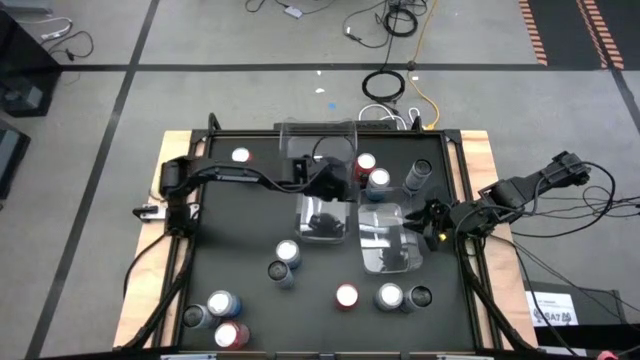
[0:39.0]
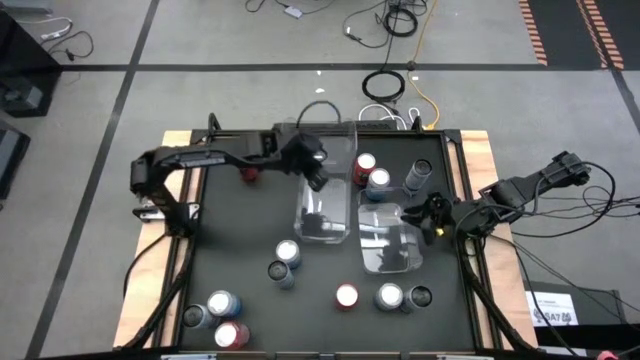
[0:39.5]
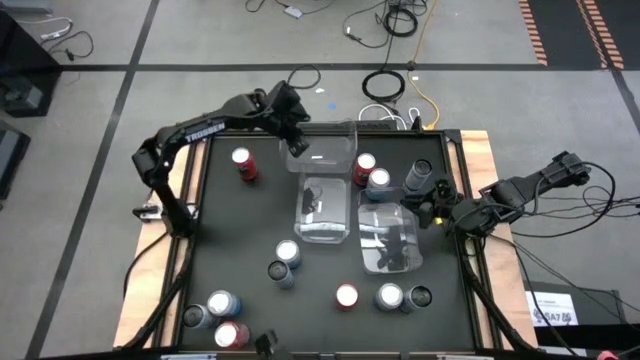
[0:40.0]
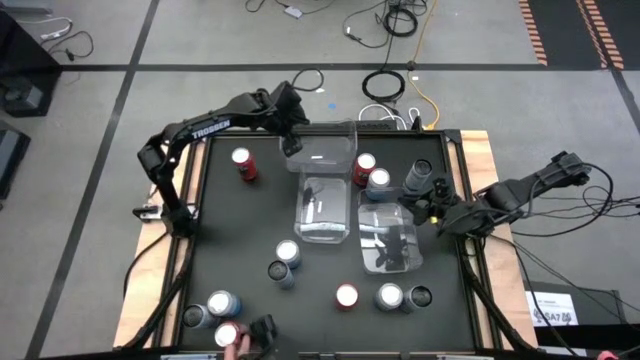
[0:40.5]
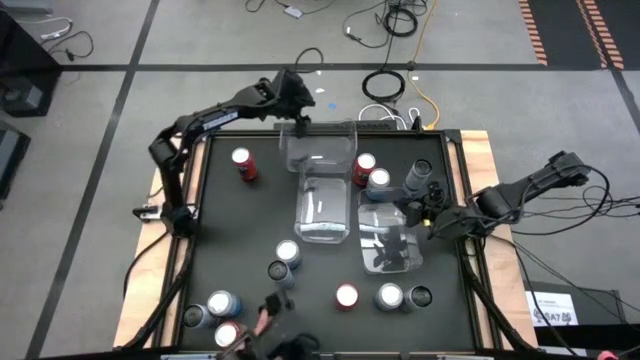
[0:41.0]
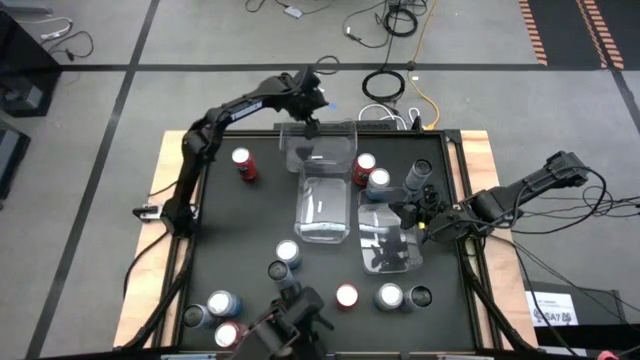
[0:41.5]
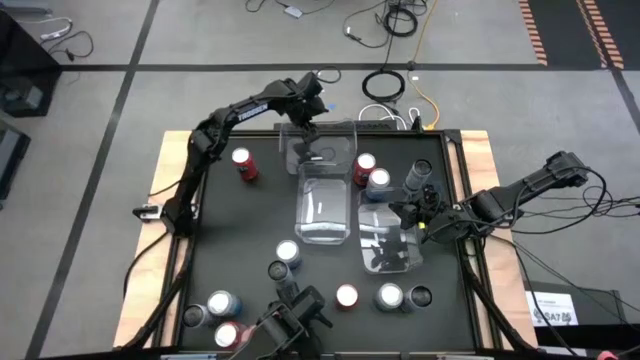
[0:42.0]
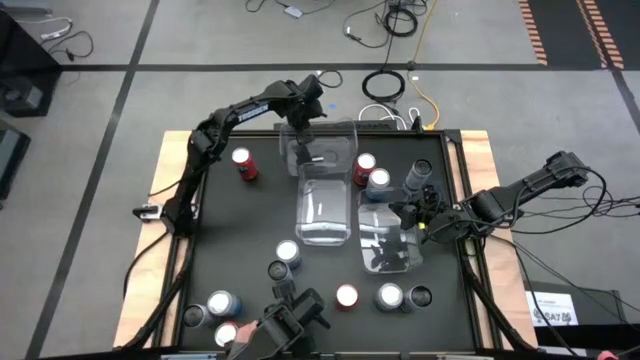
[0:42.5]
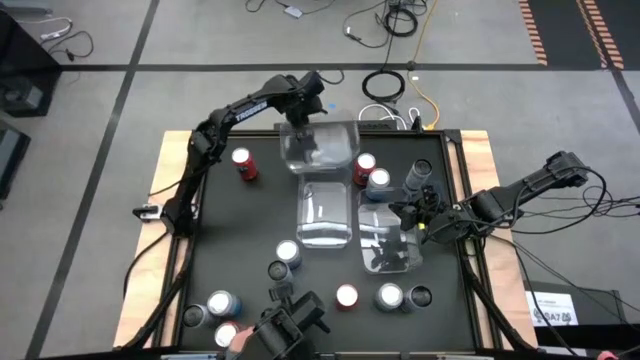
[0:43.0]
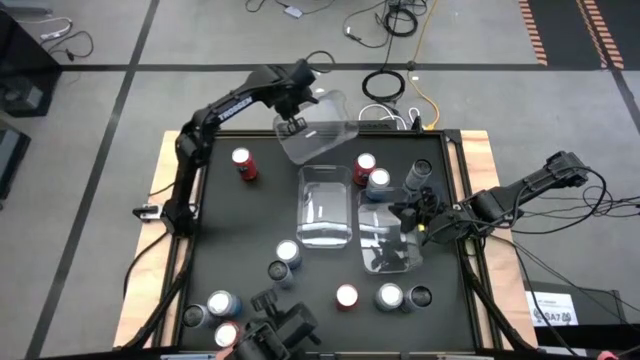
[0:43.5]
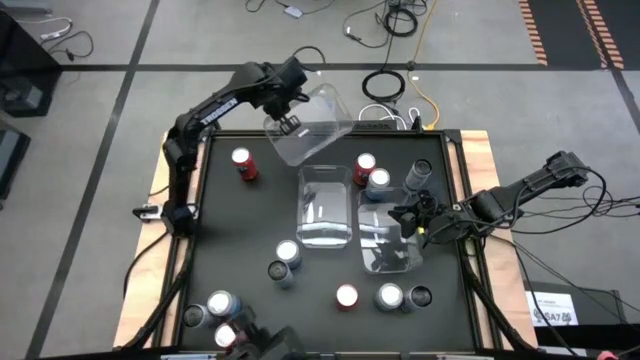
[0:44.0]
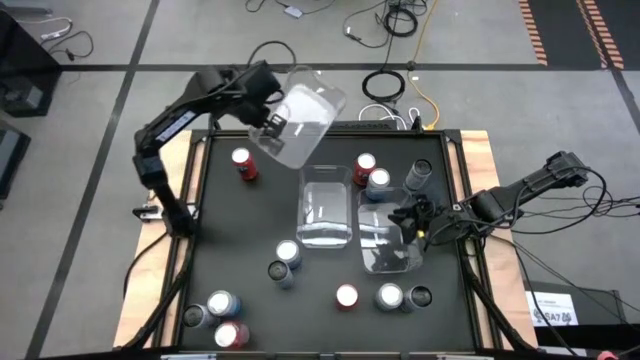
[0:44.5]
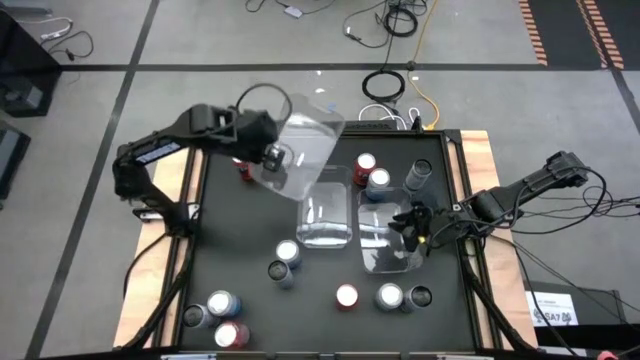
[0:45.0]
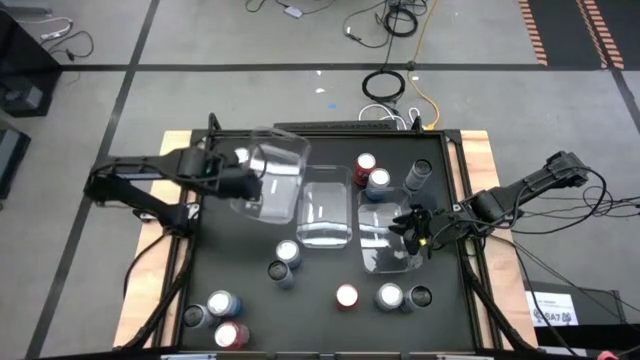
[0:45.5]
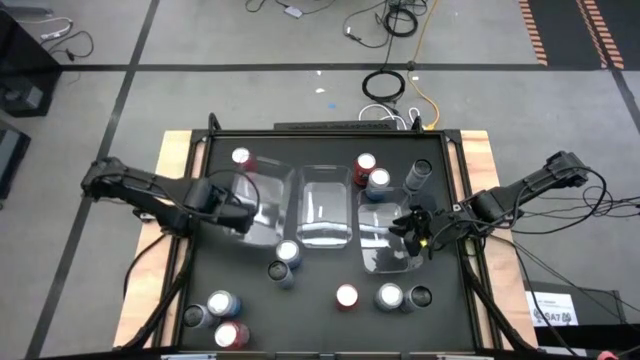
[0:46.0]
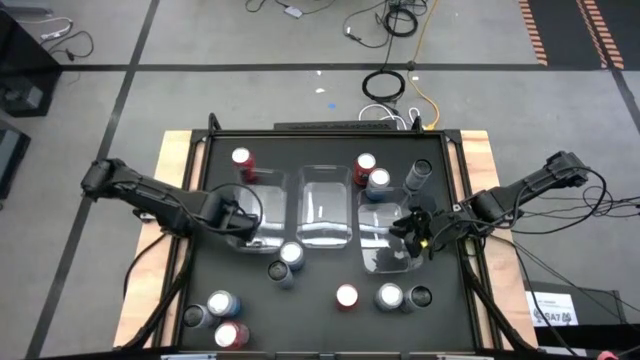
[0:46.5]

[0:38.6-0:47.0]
Task: Sort soda cans
Move the top transparent bin to the middle left of the table

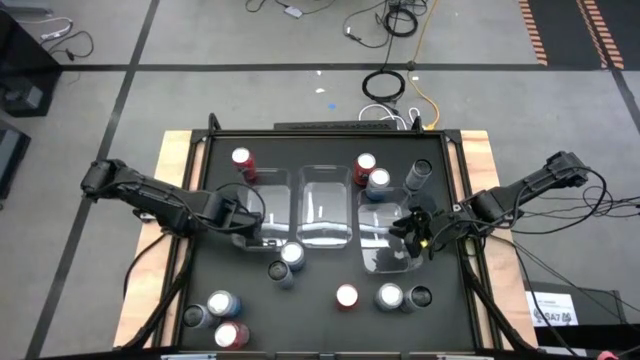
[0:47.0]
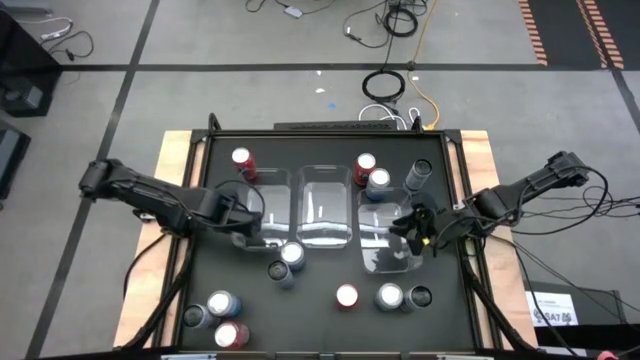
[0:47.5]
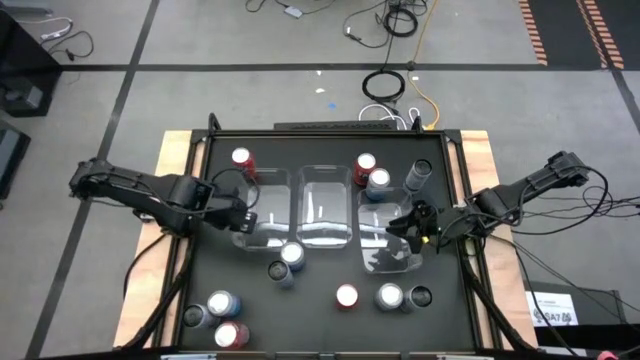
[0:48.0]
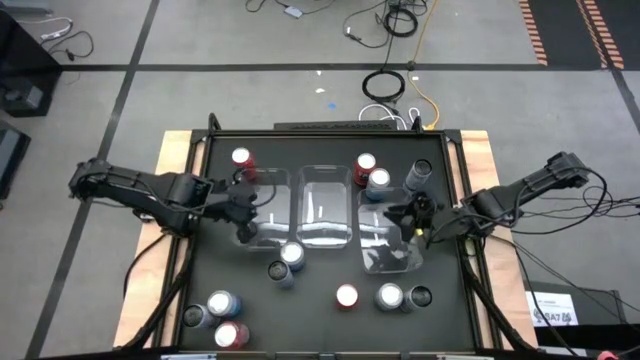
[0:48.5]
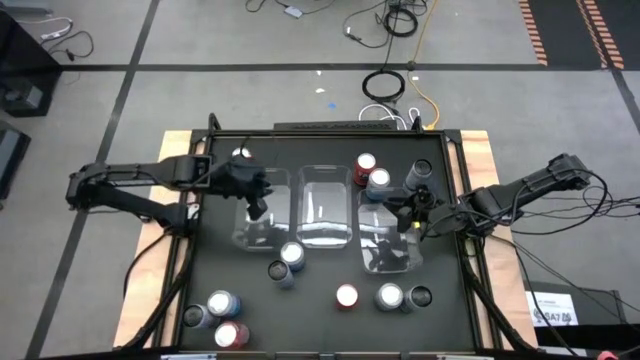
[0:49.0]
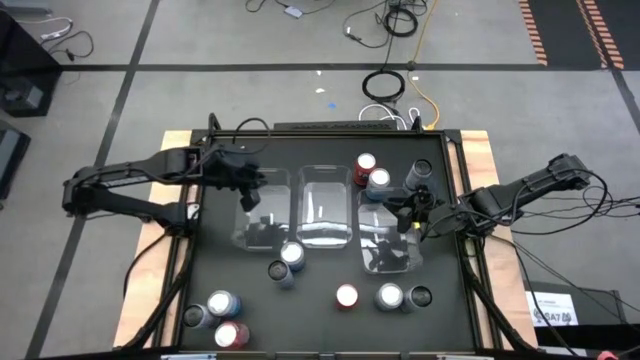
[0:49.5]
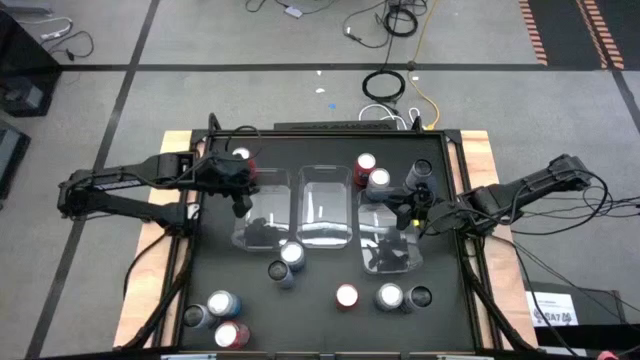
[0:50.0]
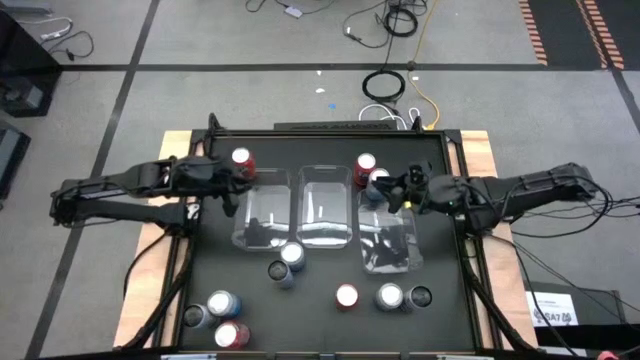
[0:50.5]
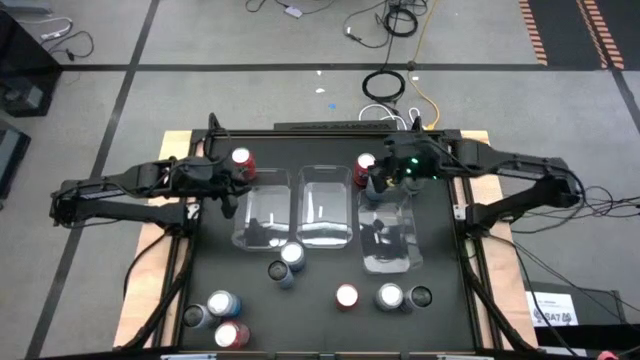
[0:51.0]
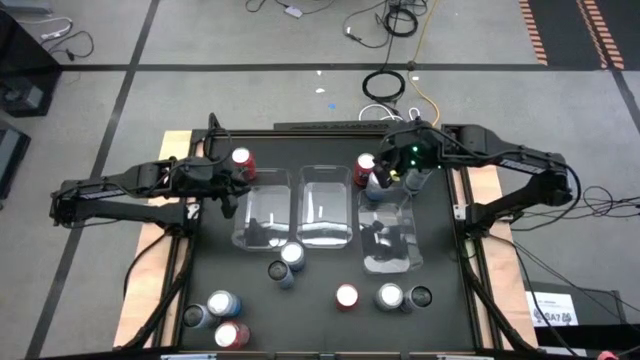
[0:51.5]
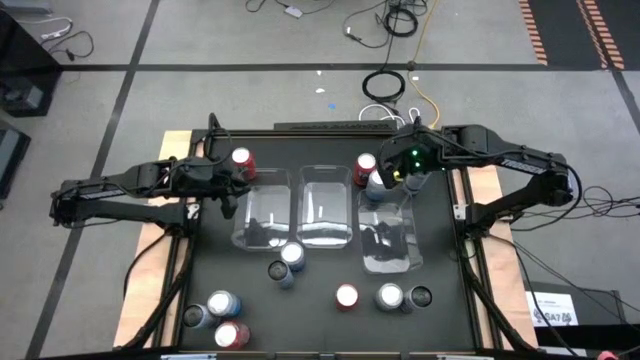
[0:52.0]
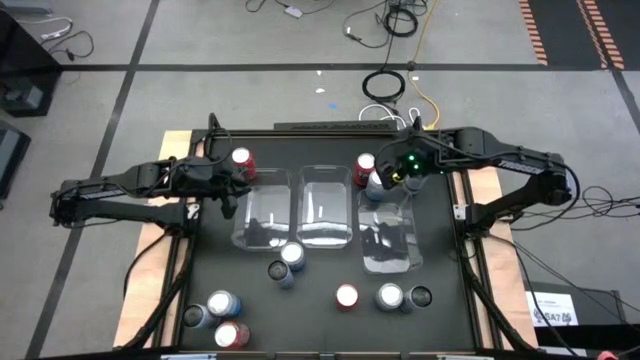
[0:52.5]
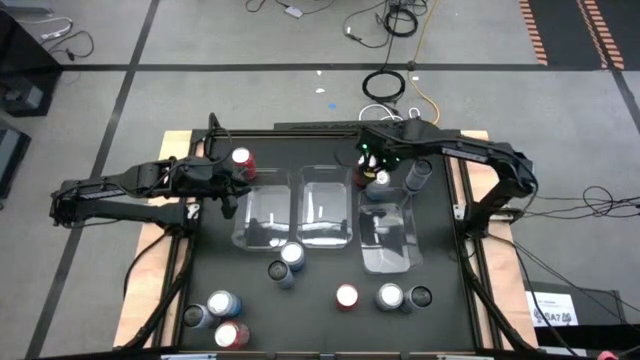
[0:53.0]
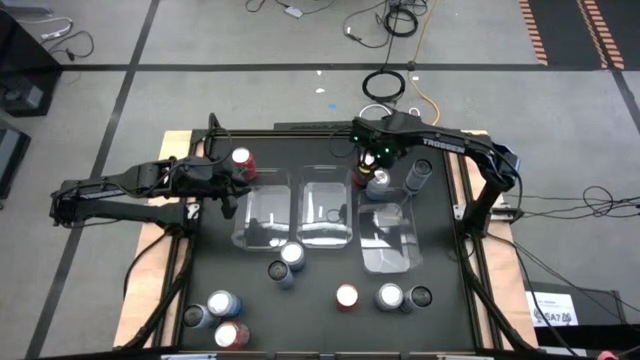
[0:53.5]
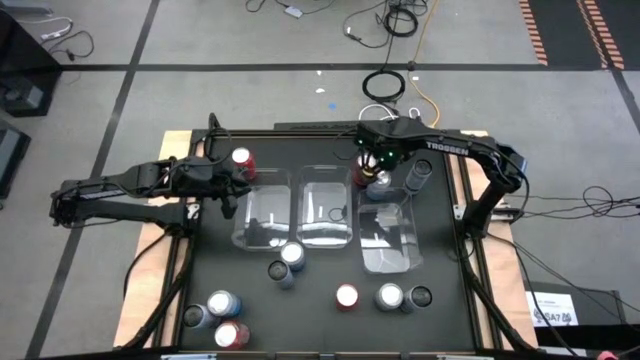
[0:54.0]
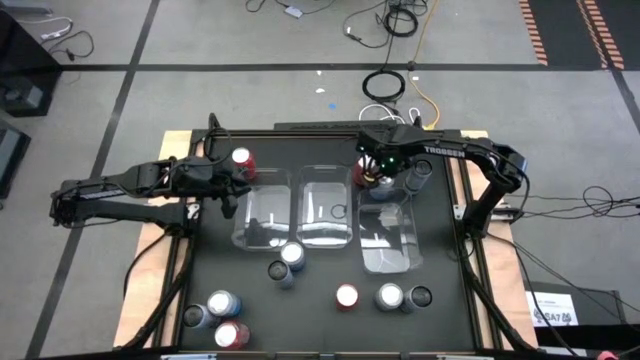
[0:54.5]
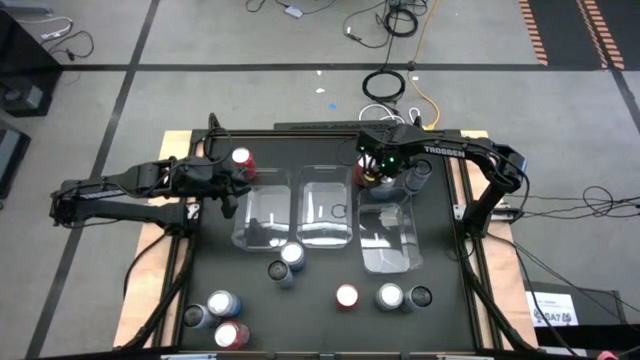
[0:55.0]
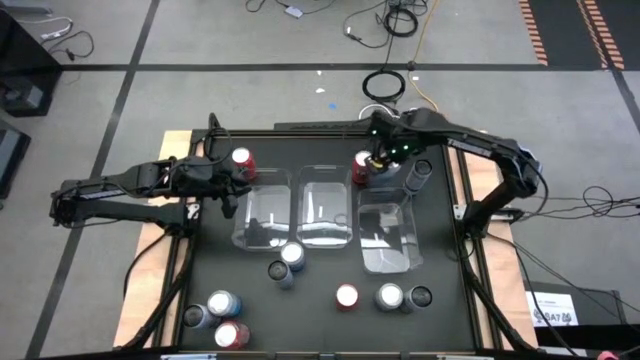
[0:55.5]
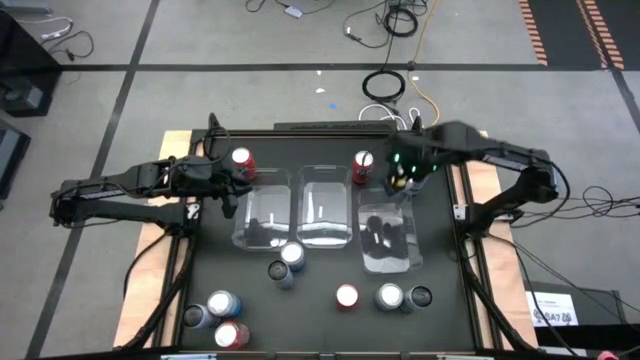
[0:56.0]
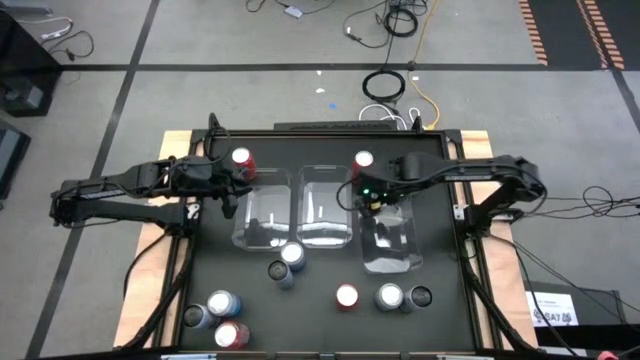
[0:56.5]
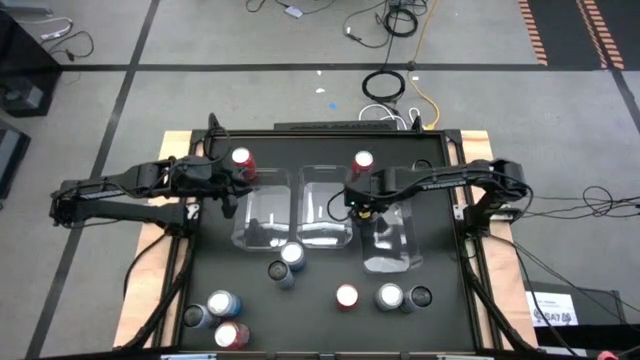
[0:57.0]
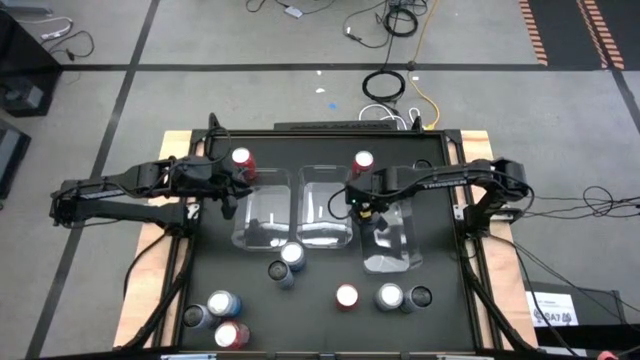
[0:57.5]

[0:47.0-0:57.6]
Put the blue-white soda can into the middle right transparent bin

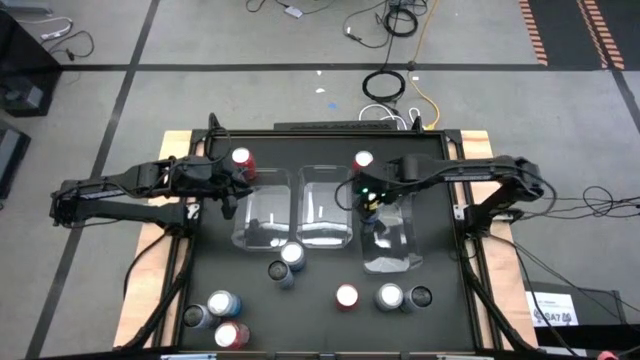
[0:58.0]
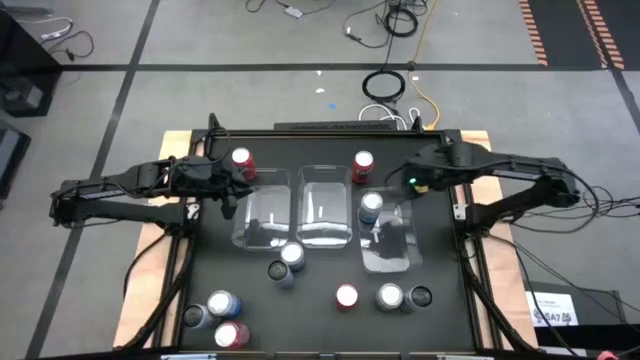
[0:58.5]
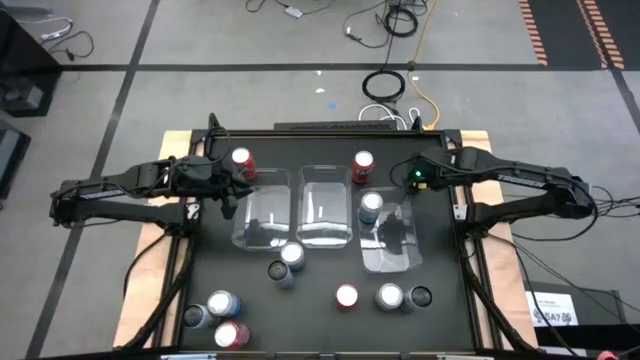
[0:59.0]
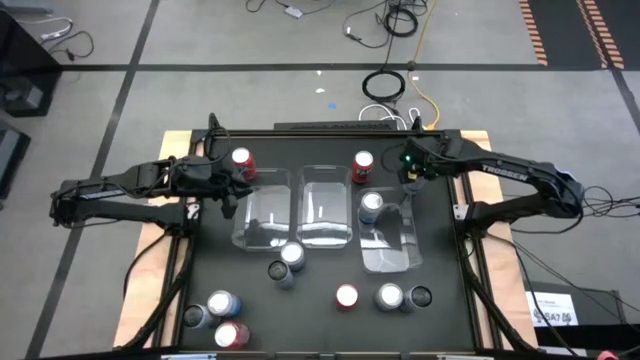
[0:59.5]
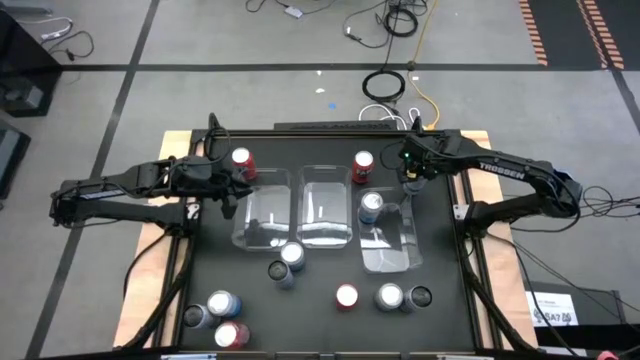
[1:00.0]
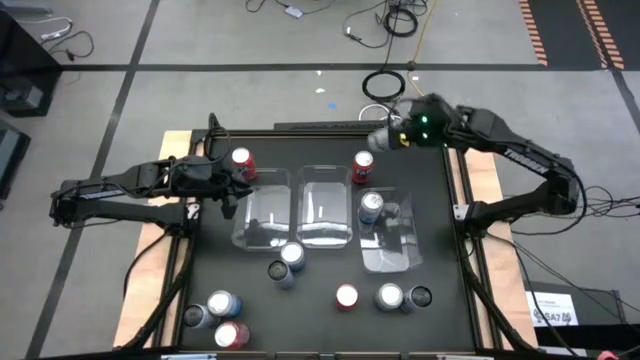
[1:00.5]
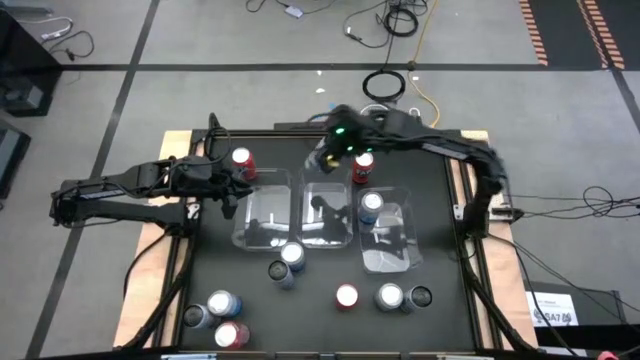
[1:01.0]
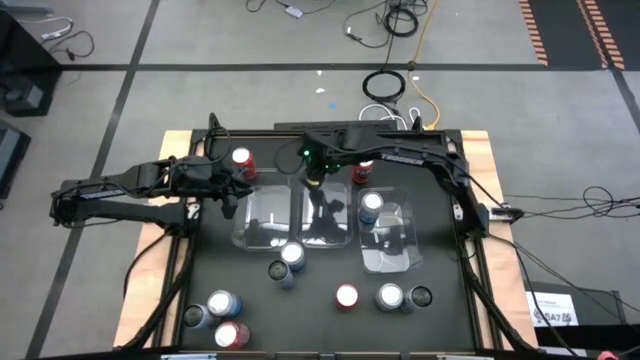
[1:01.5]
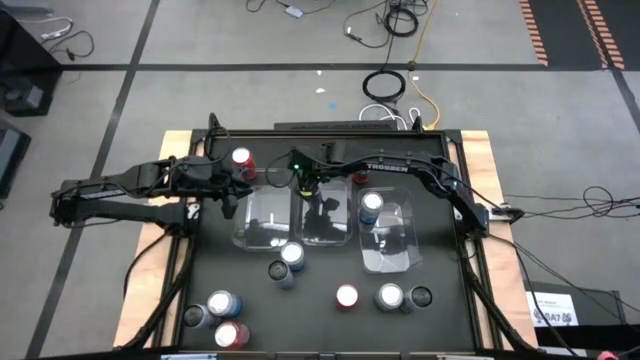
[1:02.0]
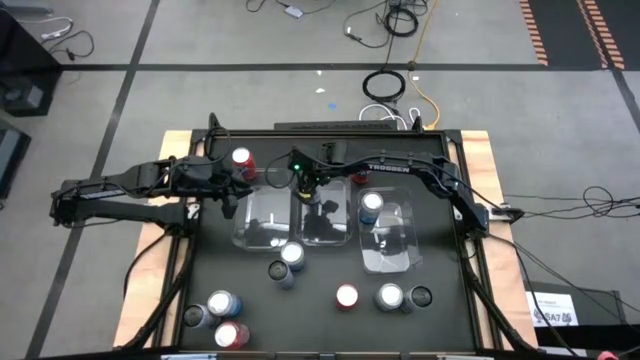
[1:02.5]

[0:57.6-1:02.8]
Put the white-blue soda can into the center transparent bin
